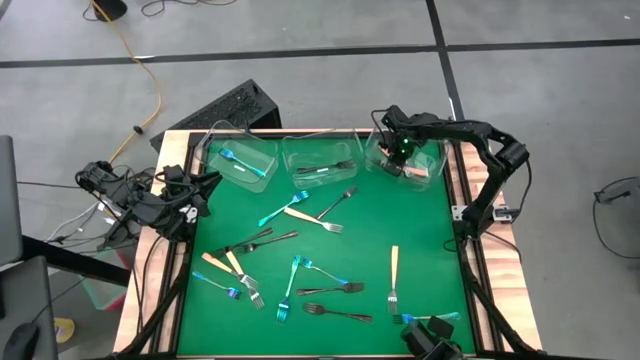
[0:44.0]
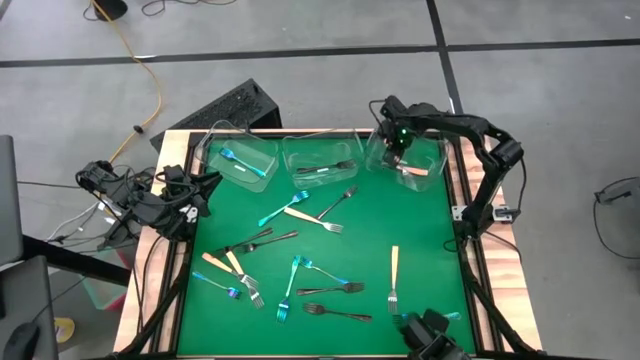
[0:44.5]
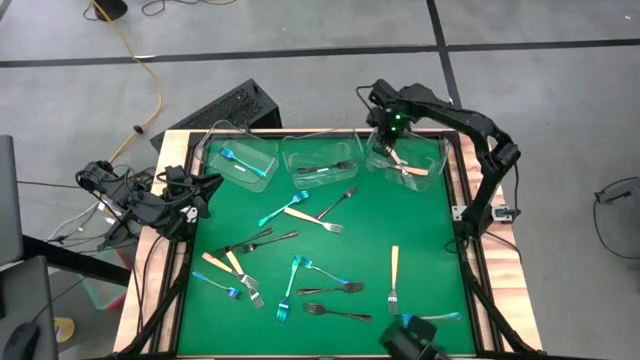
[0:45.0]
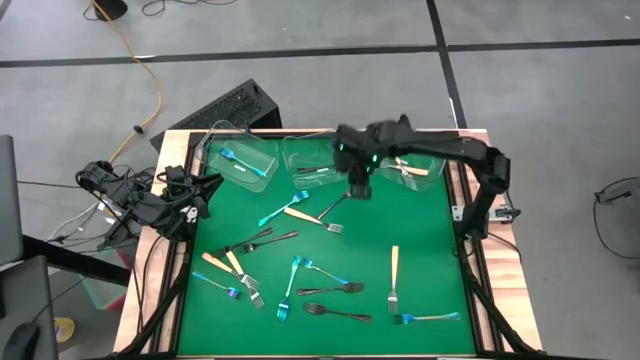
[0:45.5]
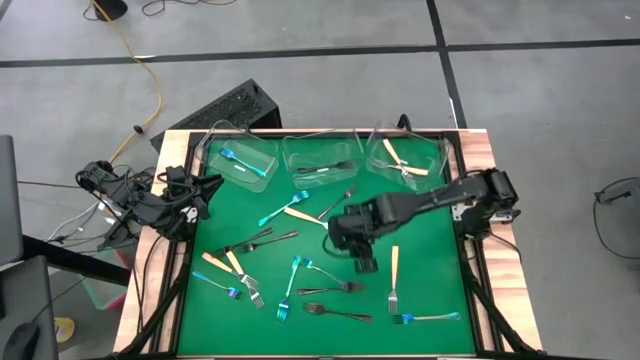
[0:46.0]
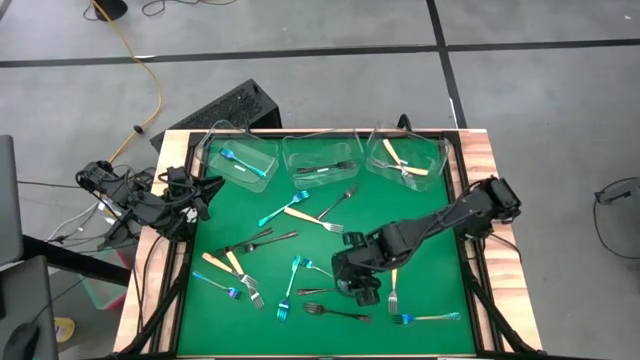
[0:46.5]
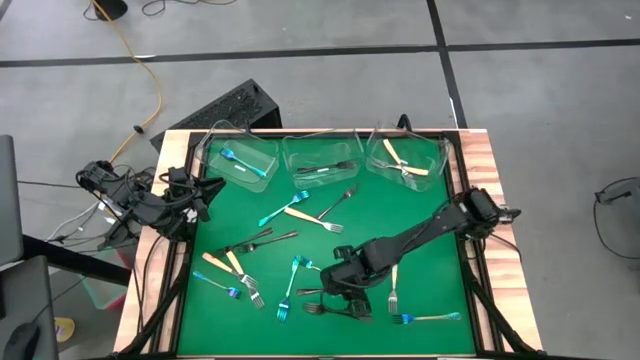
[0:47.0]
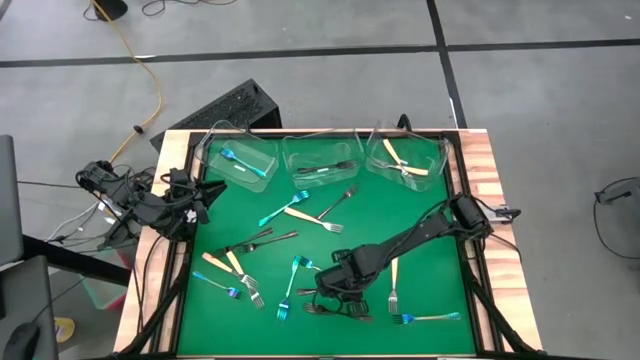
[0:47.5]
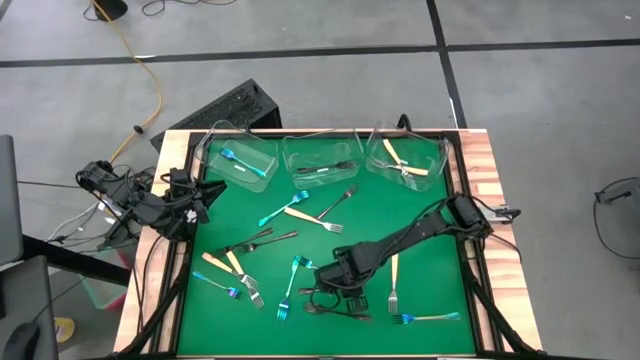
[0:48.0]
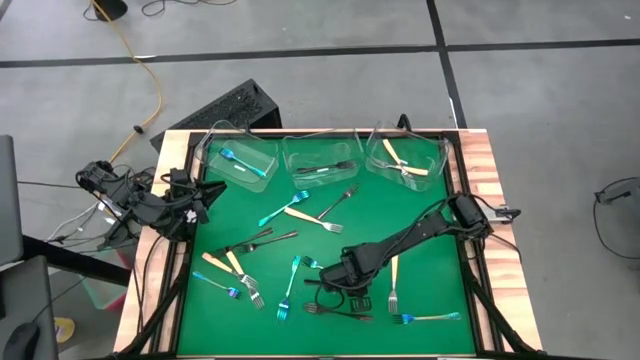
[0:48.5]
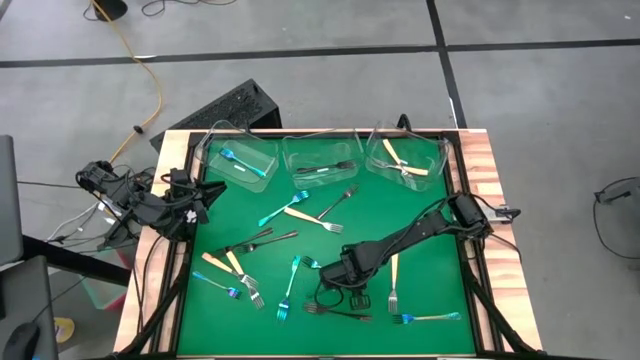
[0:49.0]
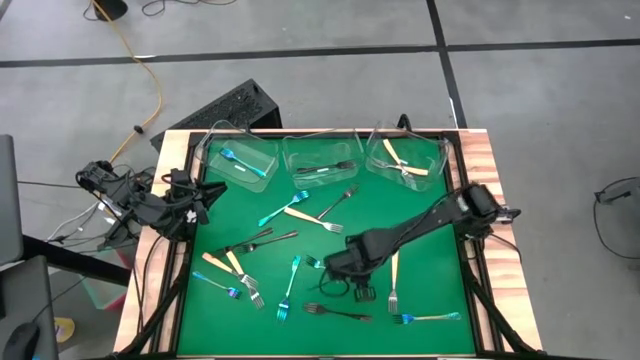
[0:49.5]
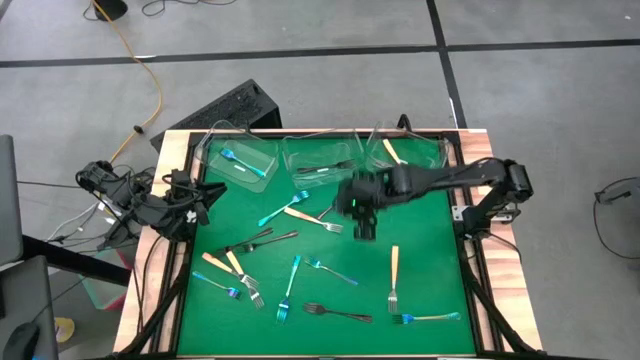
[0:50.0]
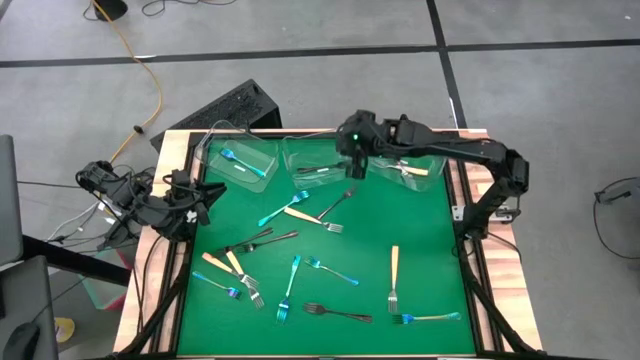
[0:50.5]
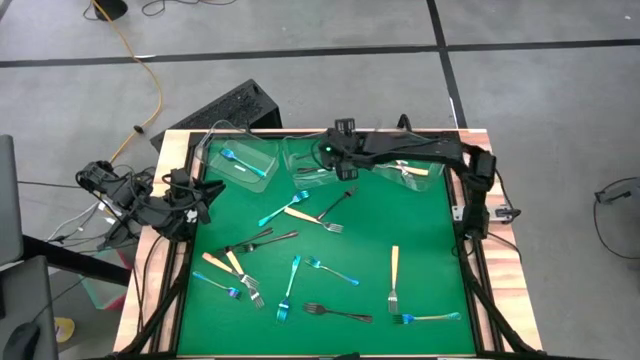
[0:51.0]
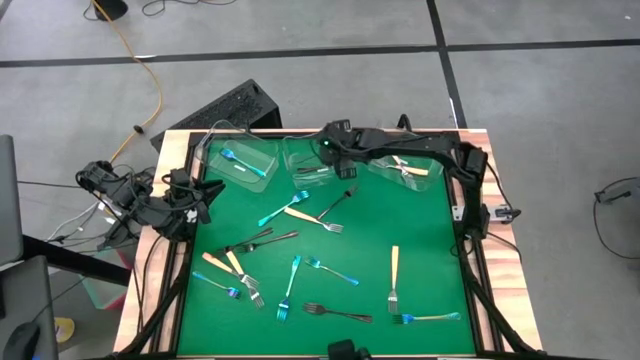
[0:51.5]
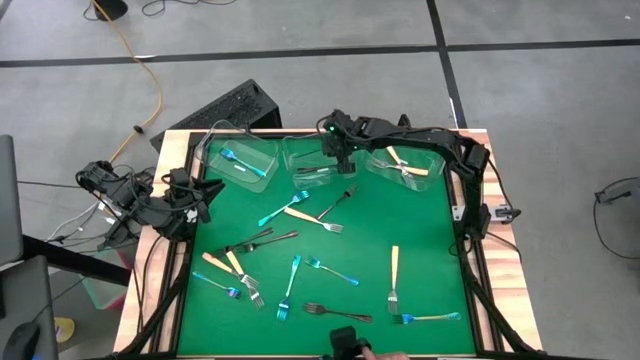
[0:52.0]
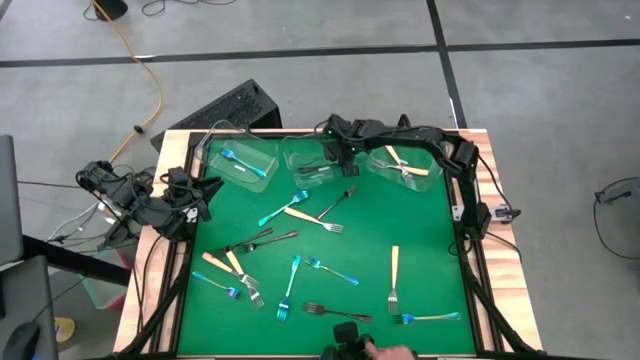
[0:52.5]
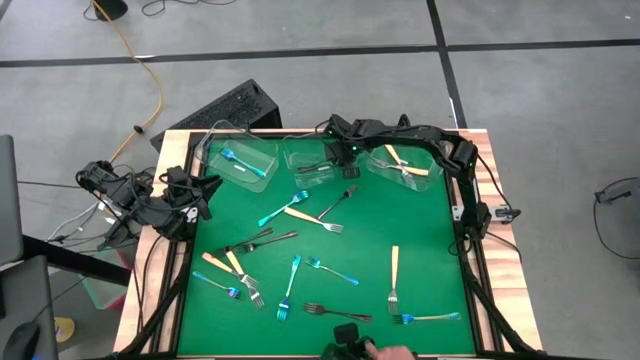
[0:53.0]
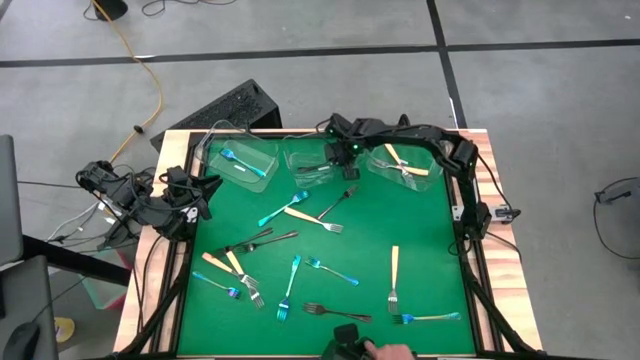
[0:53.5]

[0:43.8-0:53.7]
Task: Sort silverware by color (type)
Put the brown fork into the middle transparent bin

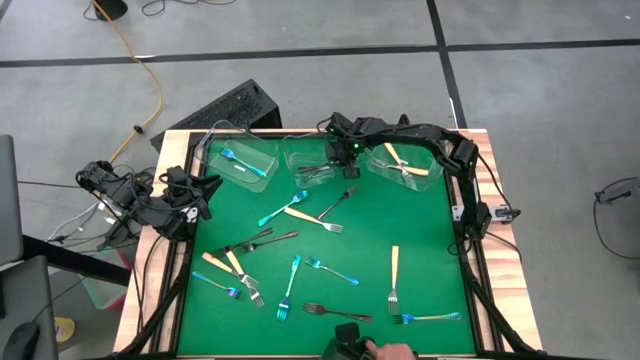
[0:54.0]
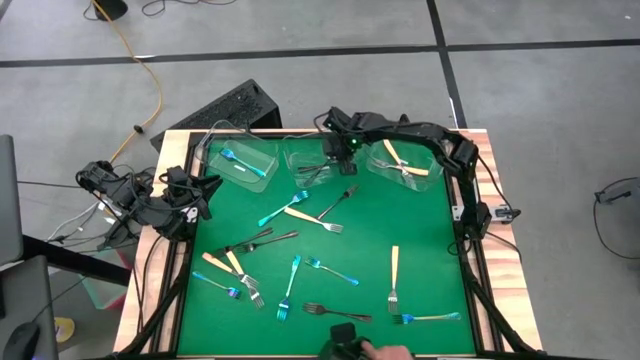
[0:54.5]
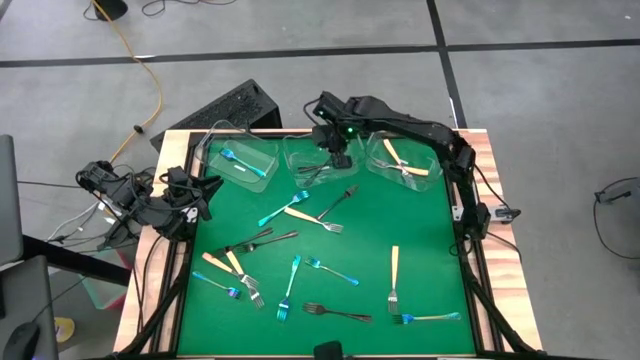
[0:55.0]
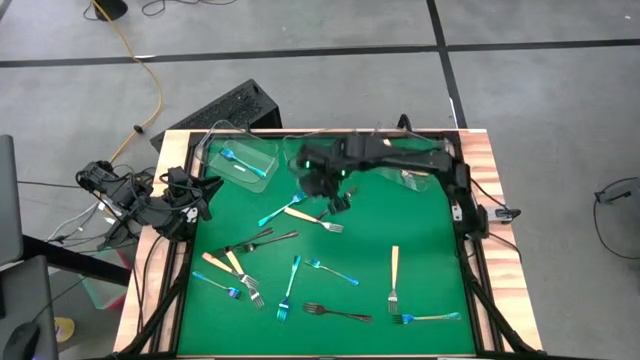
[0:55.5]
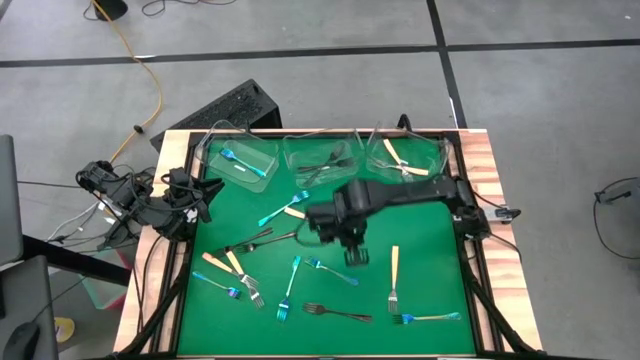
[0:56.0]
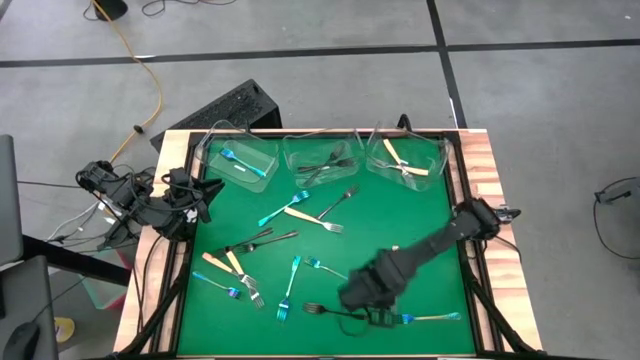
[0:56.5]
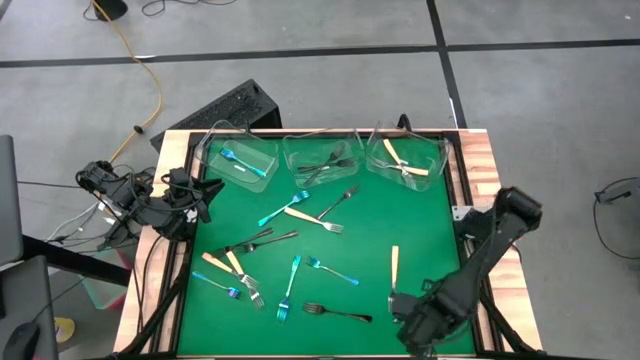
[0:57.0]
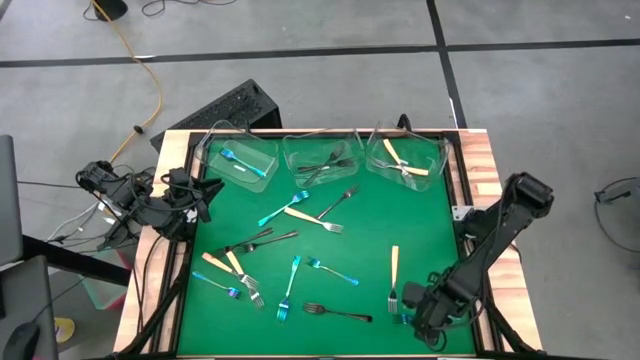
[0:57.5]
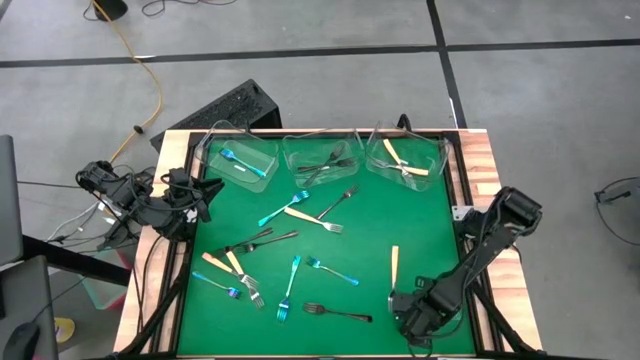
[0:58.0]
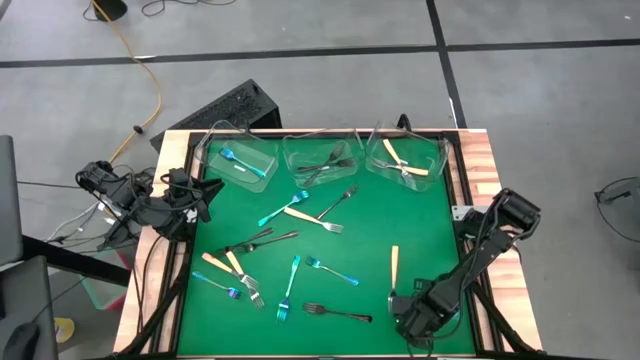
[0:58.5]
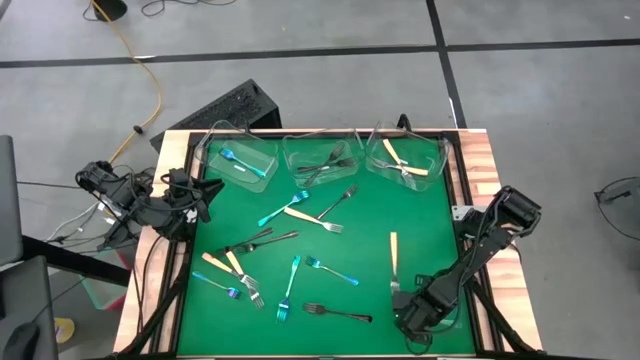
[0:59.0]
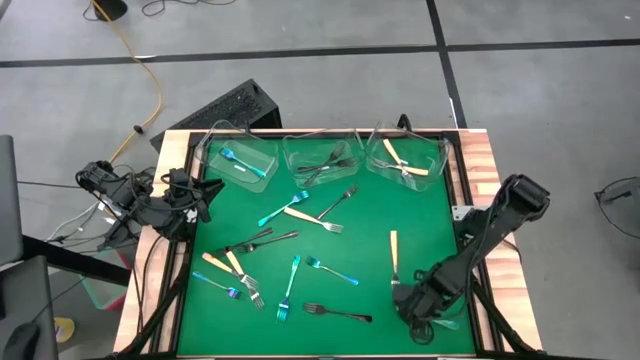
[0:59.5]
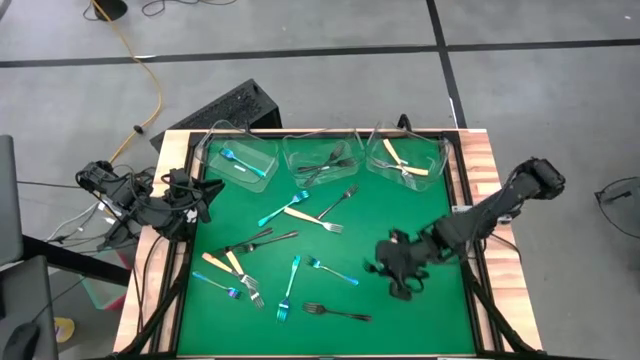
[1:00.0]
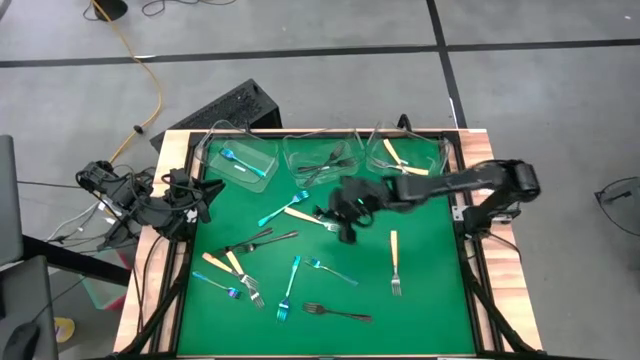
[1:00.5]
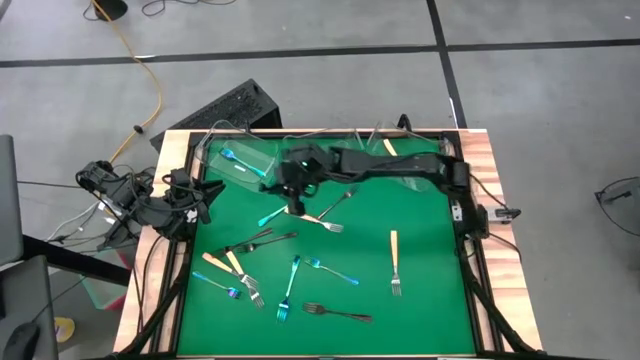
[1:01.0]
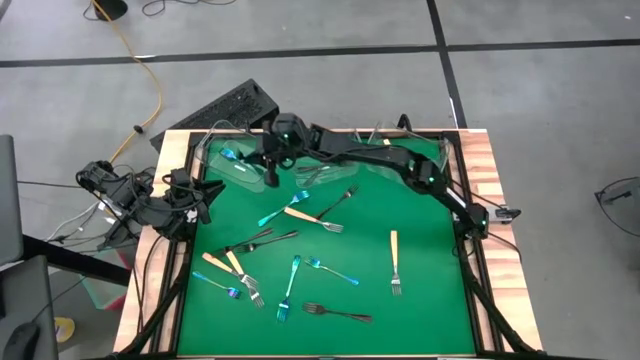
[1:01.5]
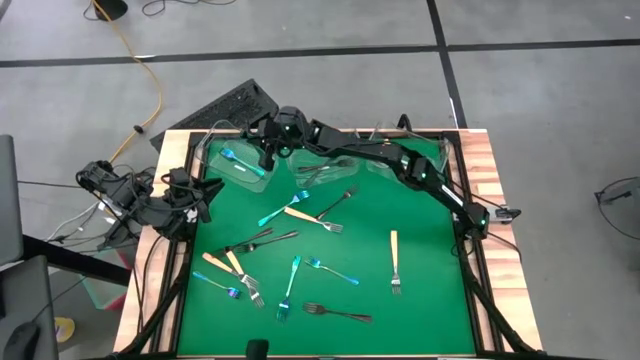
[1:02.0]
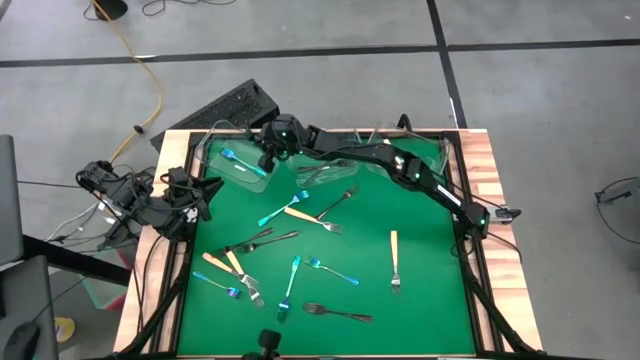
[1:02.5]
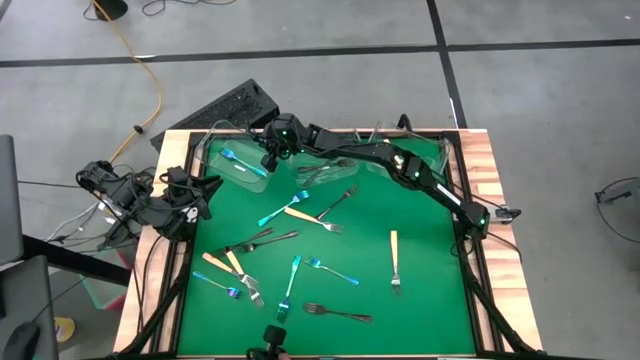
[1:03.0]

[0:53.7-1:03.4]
Put the blue fork into the left transparent bin

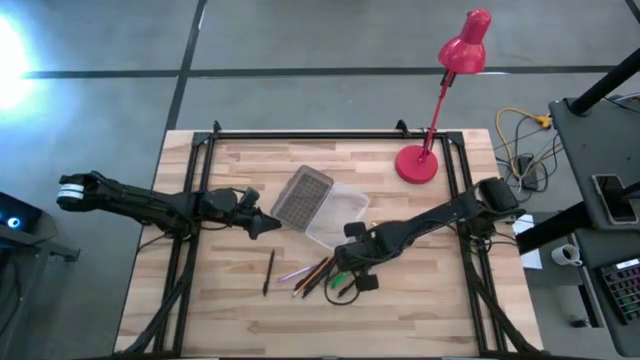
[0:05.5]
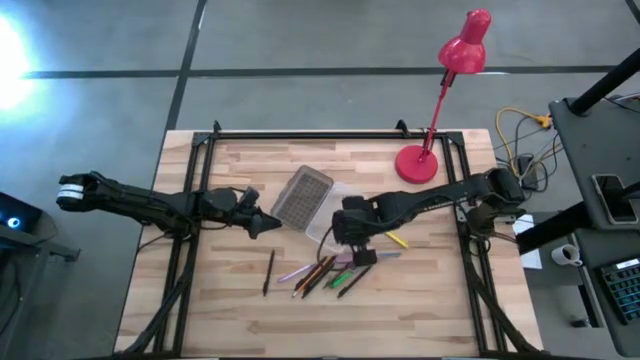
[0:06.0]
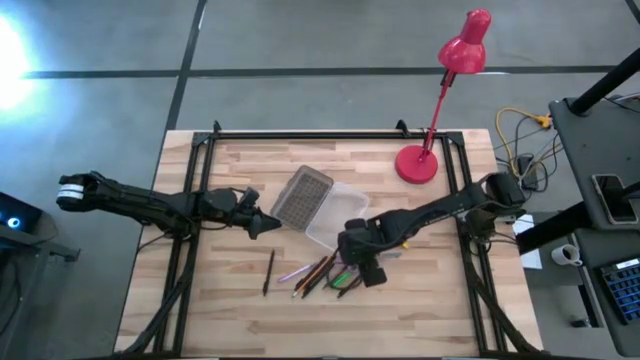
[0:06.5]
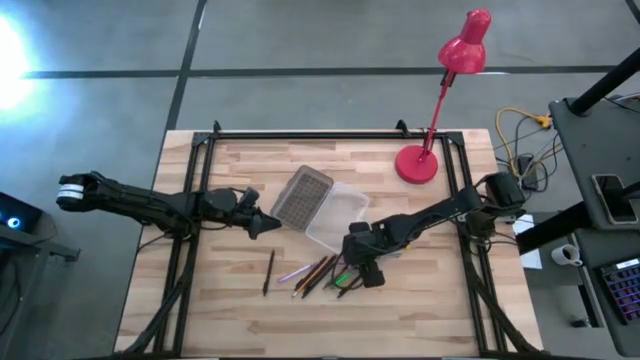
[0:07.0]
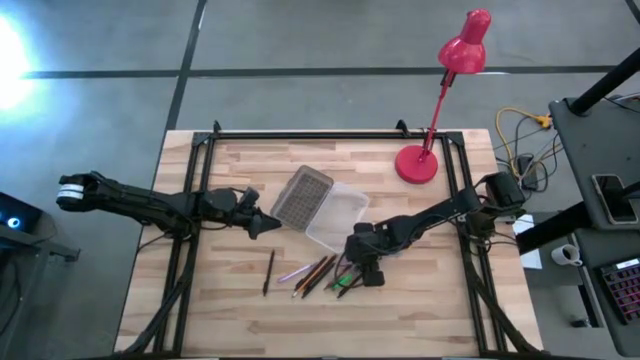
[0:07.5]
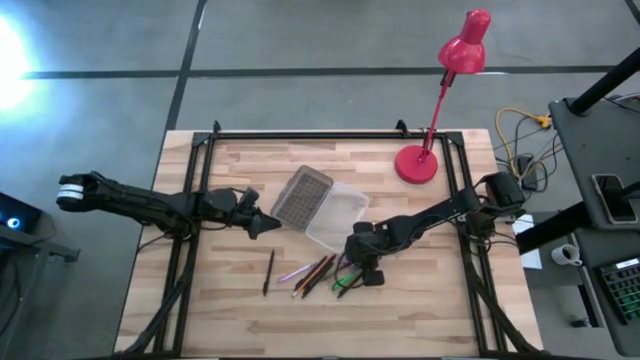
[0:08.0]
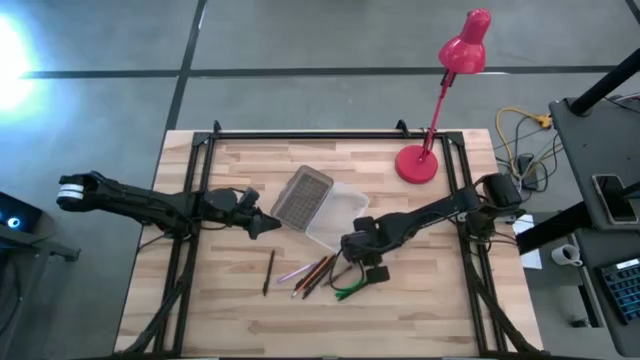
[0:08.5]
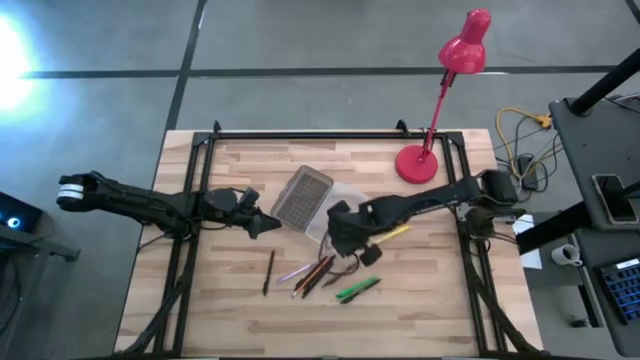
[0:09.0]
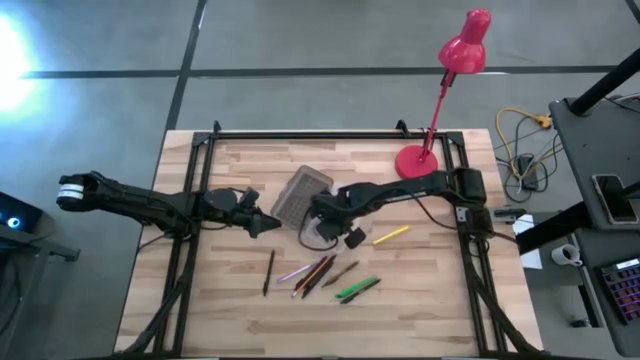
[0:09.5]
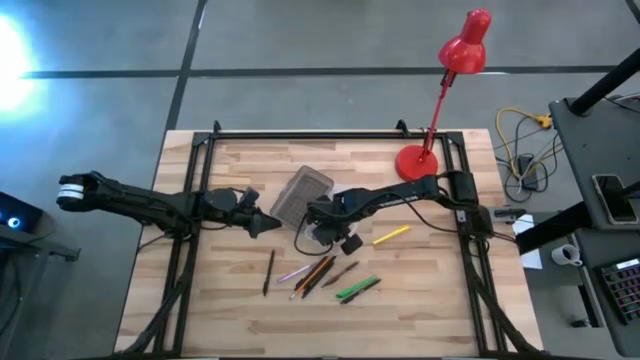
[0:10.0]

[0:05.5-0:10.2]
Task: Pick & place school supplies into a supply box
Put the purple scissors into the gray supply box
